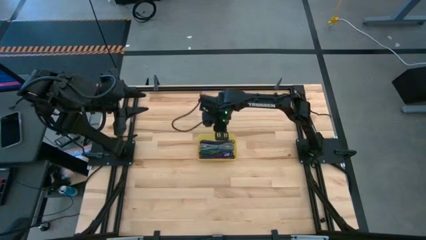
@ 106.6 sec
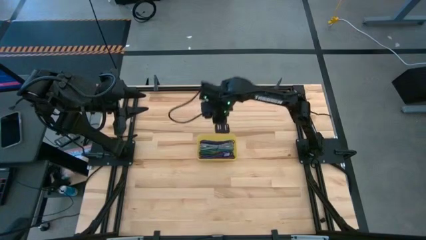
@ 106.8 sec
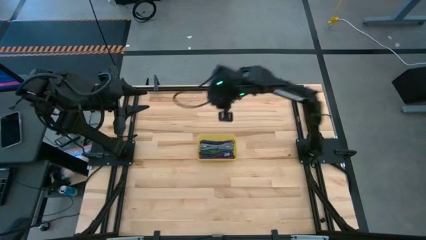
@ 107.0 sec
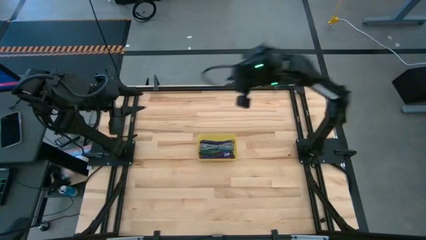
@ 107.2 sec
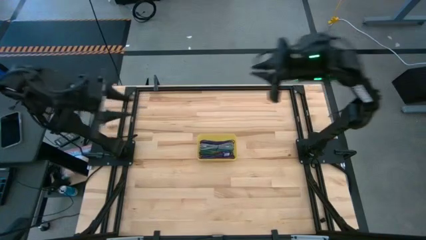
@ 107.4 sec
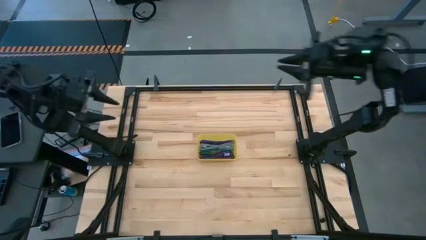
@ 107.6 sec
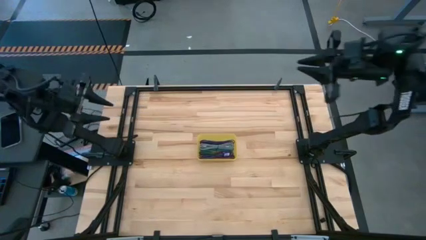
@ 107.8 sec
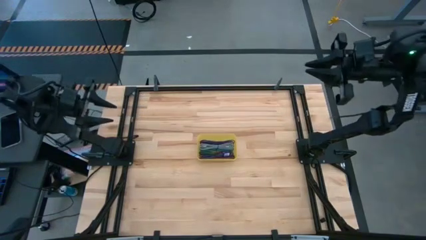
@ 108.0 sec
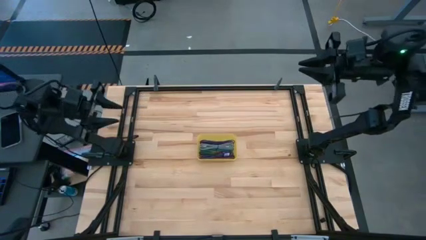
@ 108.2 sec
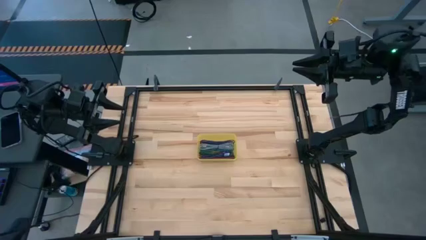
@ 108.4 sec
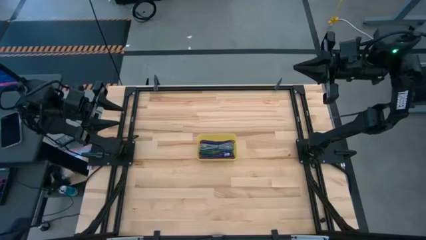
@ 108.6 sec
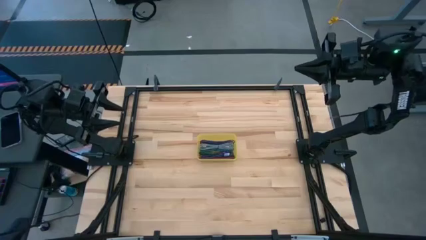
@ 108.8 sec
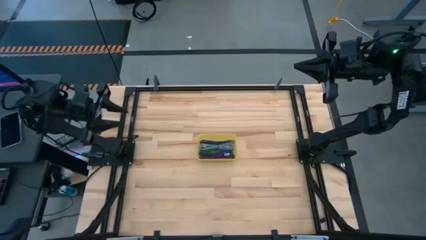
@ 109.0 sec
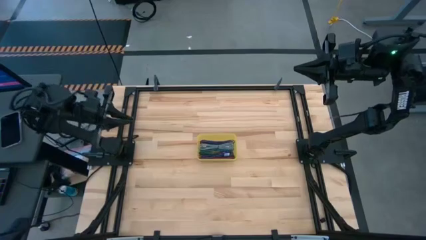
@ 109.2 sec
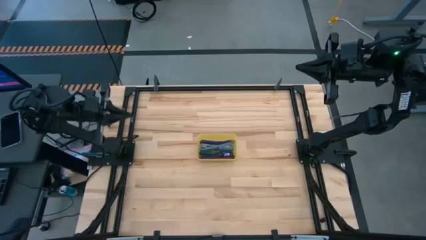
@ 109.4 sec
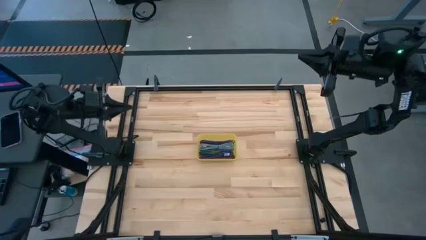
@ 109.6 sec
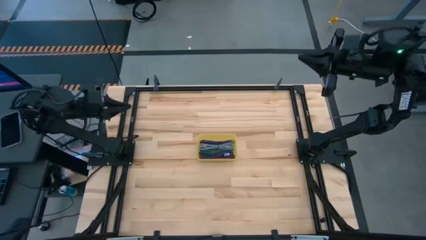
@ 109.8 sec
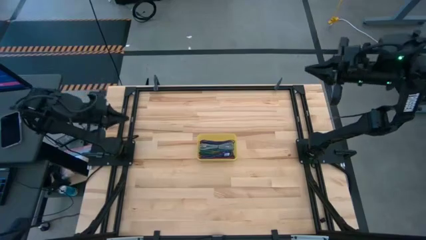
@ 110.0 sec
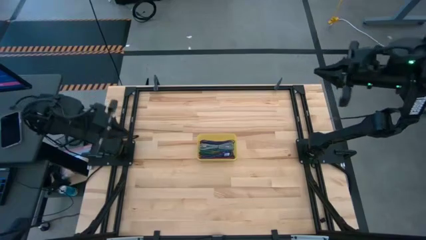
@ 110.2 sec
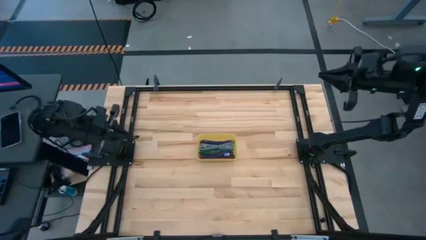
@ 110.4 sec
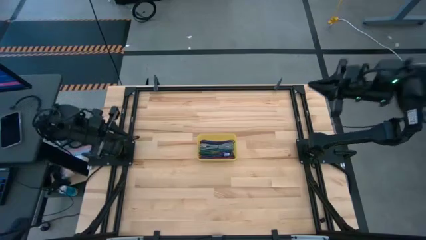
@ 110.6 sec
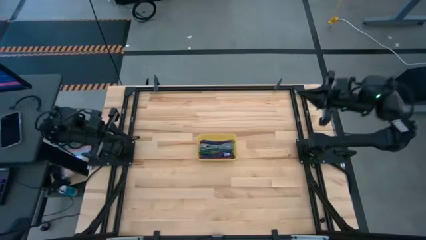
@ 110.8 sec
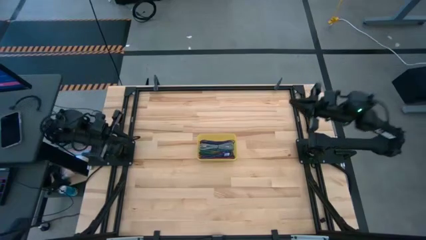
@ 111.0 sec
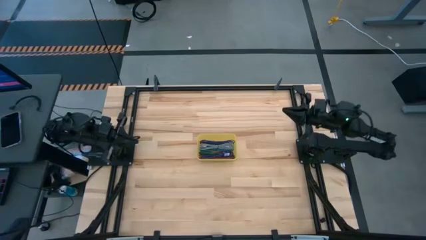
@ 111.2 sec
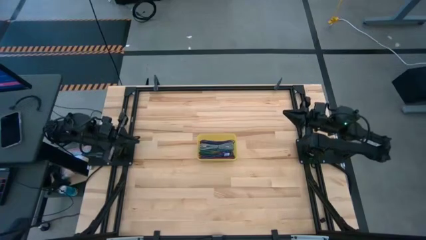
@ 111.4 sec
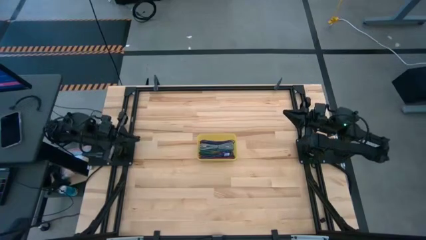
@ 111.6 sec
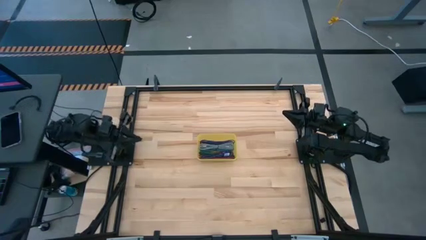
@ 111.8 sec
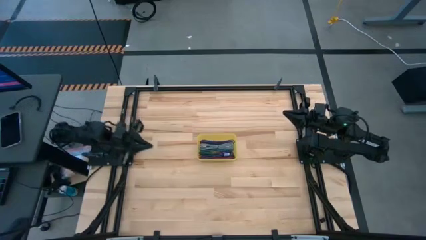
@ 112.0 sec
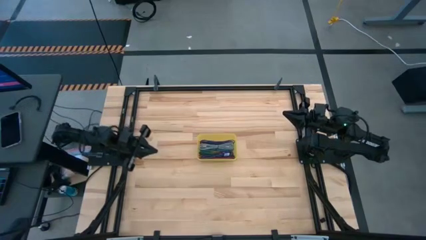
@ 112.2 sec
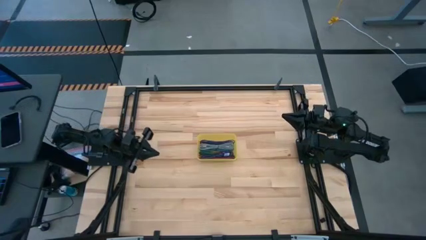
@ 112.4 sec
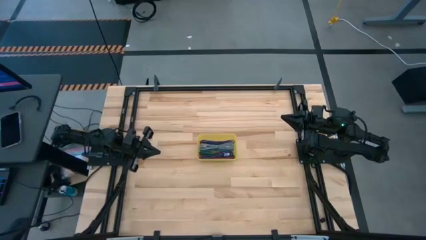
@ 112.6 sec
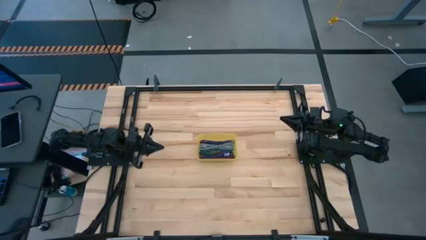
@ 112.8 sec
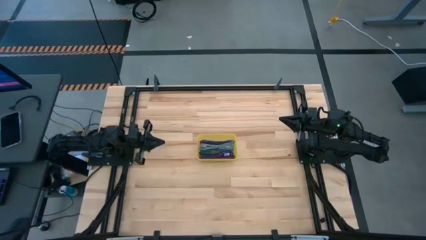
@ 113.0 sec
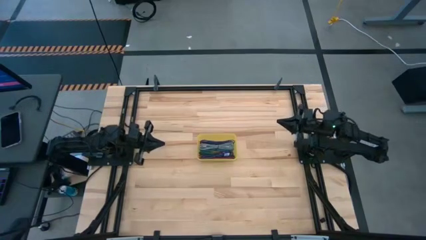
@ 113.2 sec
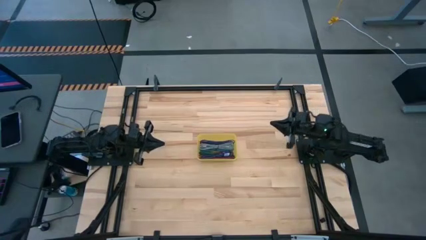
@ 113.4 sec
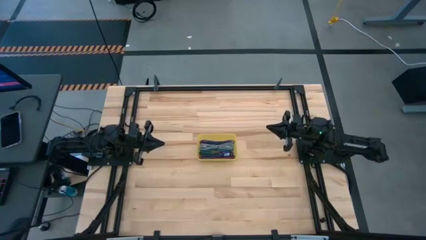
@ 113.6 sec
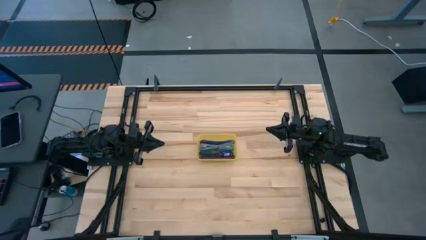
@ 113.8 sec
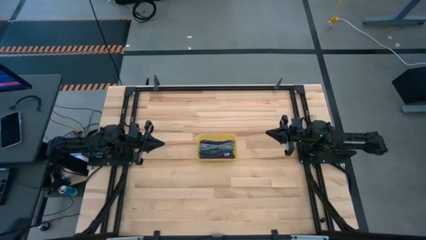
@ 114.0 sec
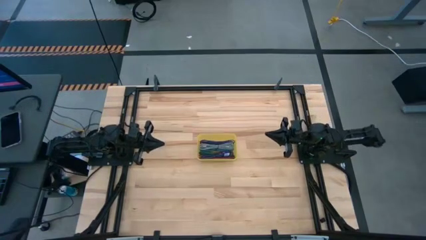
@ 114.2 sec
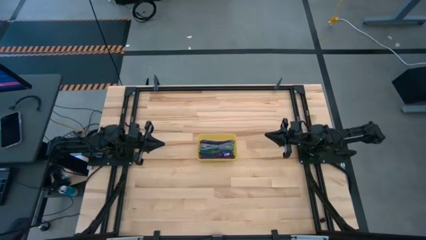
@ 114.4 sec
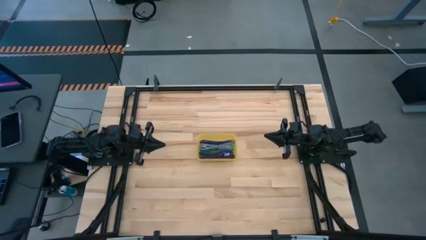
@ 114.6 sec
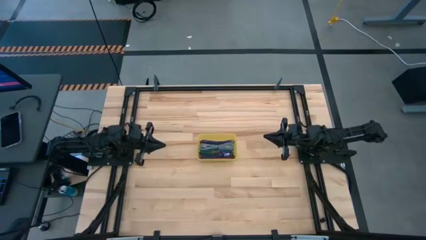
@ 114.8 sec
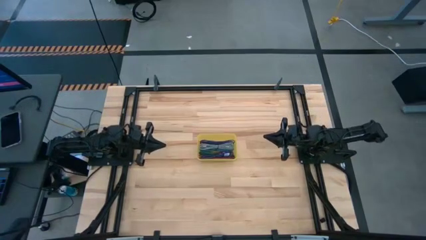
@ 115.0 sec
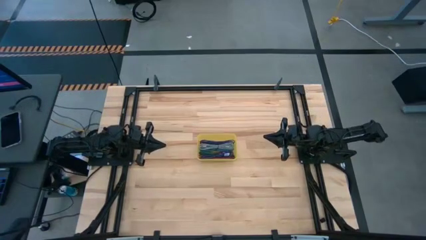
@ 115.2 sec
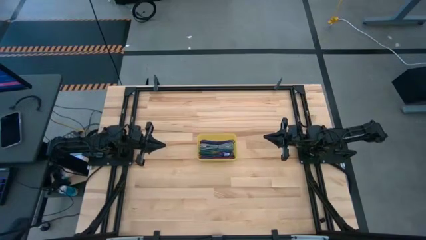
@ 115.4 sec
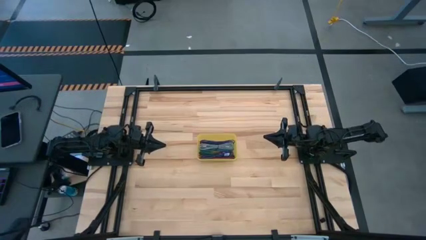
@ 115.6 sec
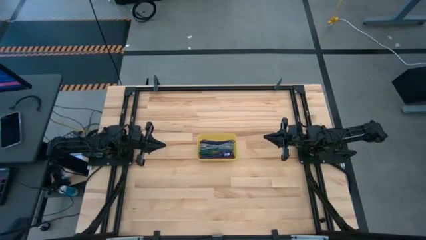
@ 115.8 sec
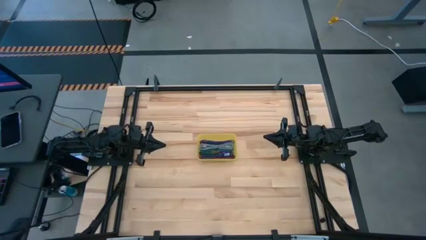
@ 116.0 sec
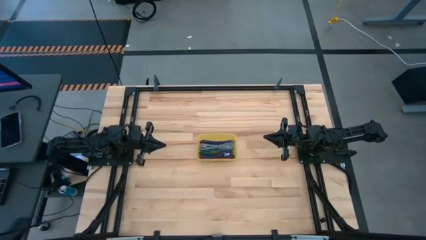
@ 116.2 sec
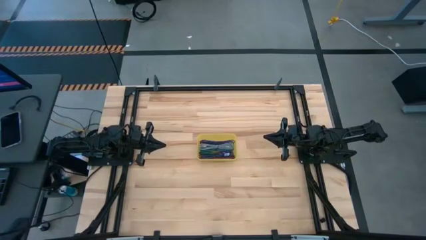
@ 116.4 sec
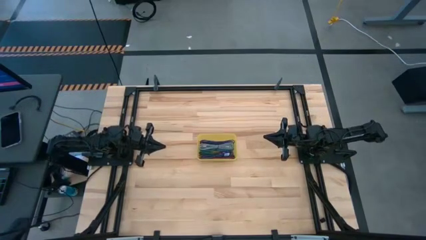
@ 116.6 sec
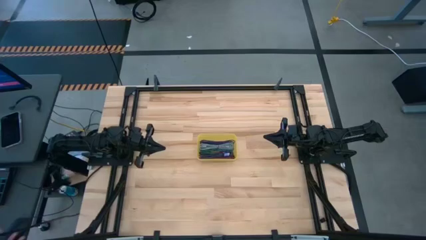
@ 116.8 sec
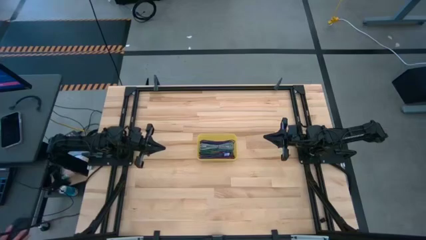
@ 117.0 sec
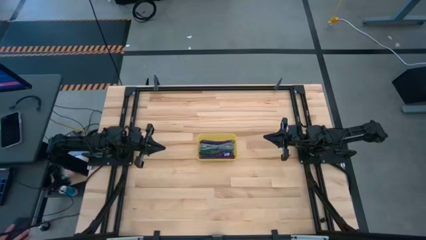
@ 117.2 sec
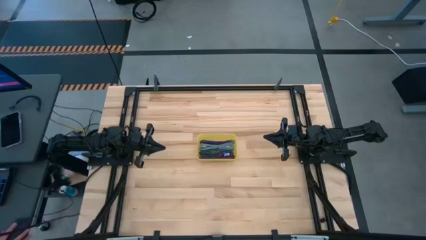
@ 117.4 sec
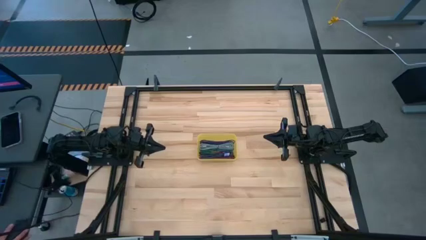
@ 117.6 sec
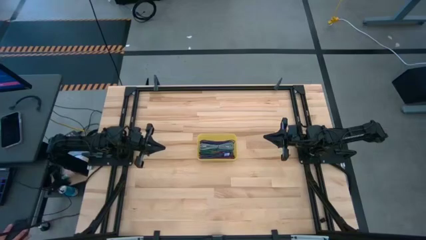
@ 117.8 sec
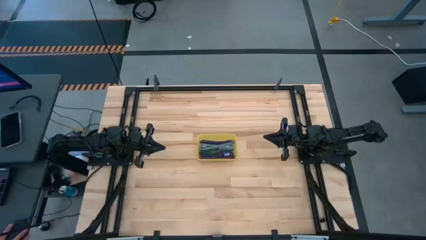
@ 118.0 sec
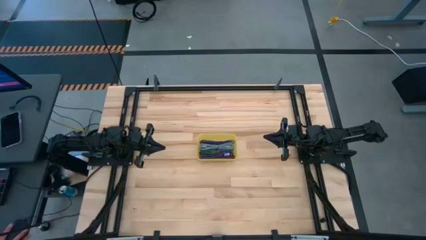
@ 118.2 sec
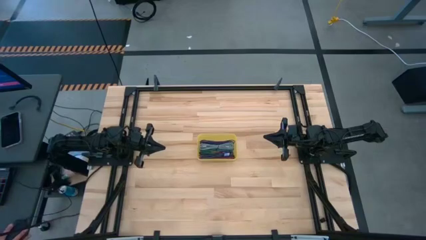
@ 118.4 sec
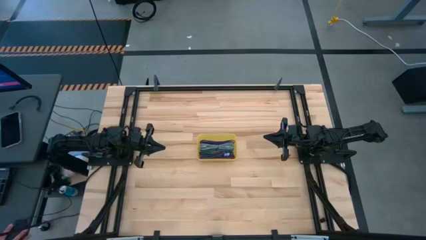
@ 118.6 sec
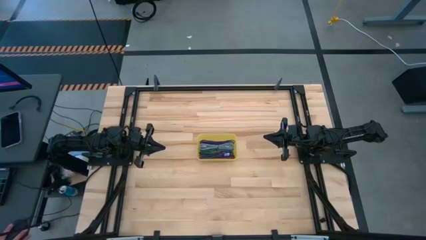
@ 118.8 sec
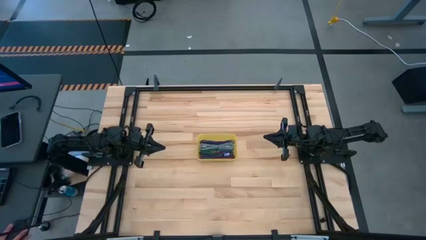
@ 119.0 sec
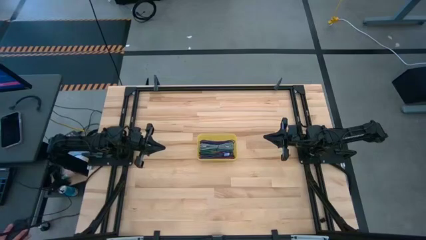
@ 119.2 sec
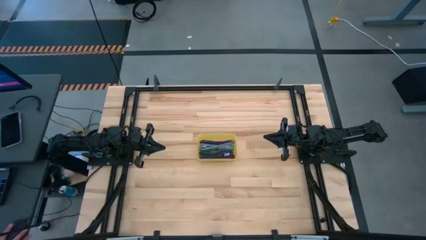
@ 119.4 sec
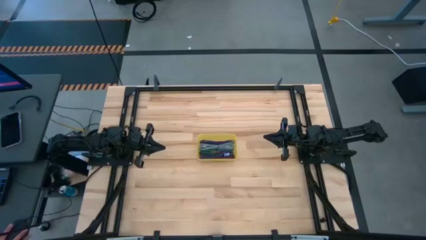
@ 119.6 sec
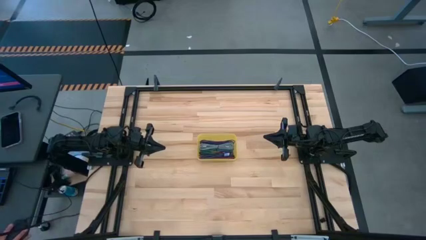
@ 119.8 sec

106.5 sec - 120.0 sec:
Task: Pick and place USB-C Cables
Return to Home Position
